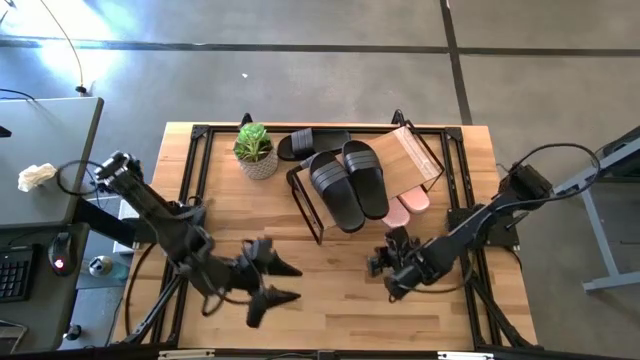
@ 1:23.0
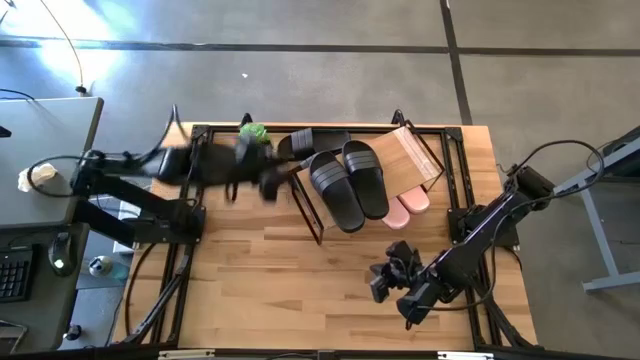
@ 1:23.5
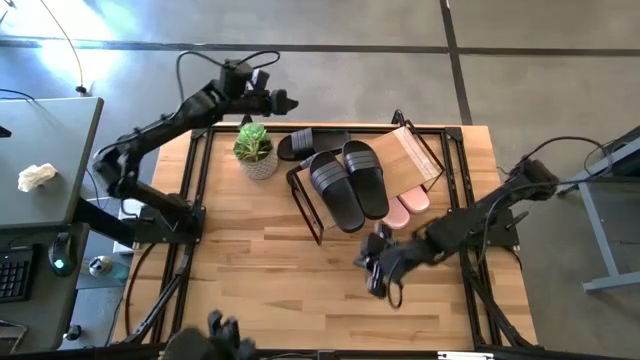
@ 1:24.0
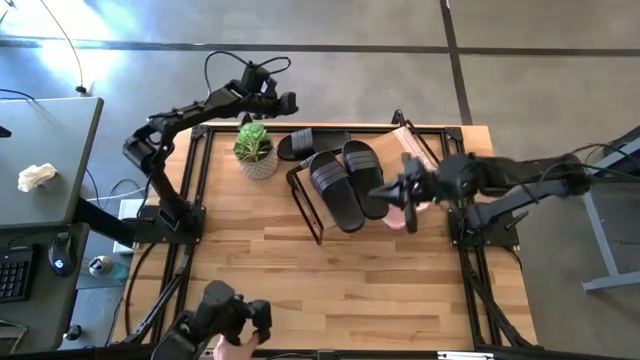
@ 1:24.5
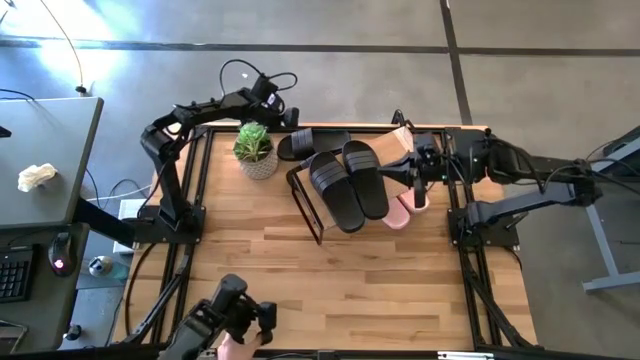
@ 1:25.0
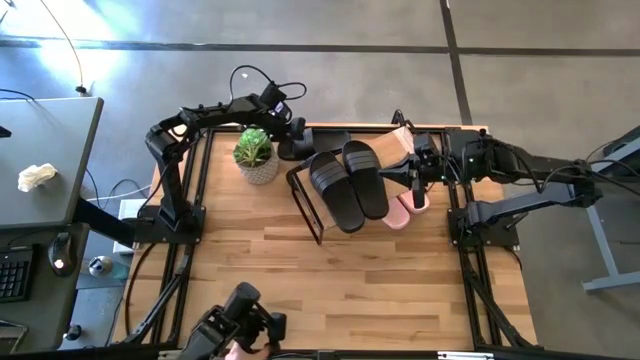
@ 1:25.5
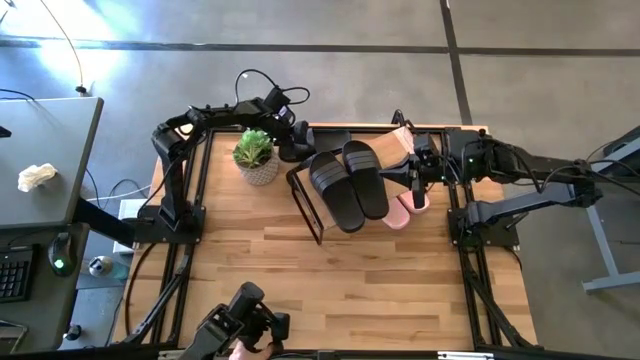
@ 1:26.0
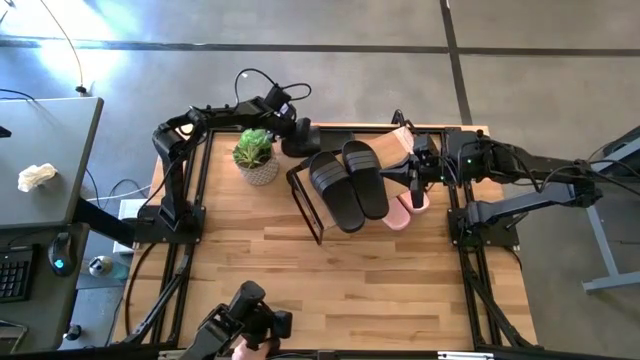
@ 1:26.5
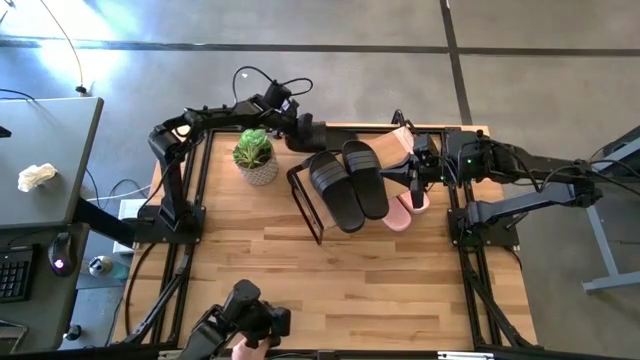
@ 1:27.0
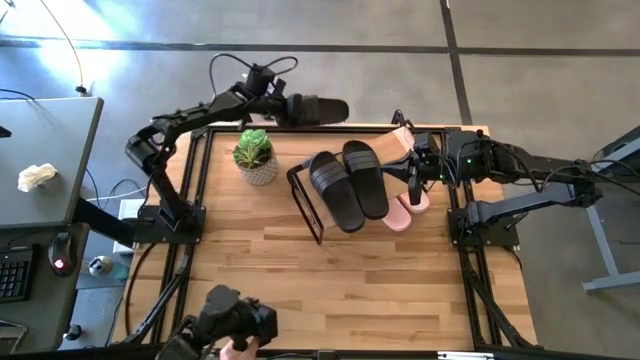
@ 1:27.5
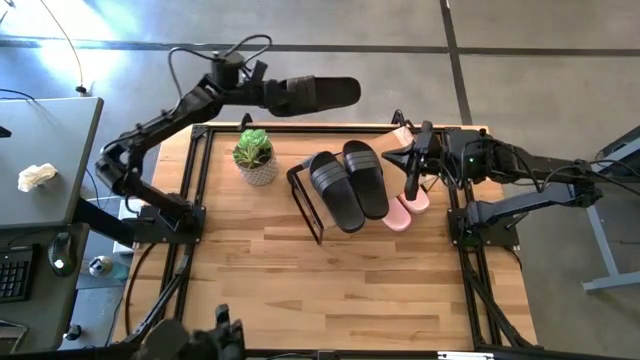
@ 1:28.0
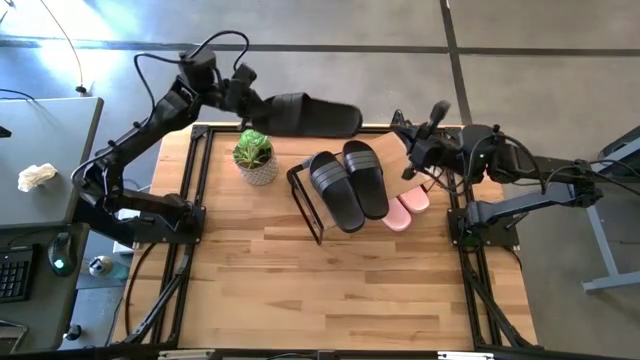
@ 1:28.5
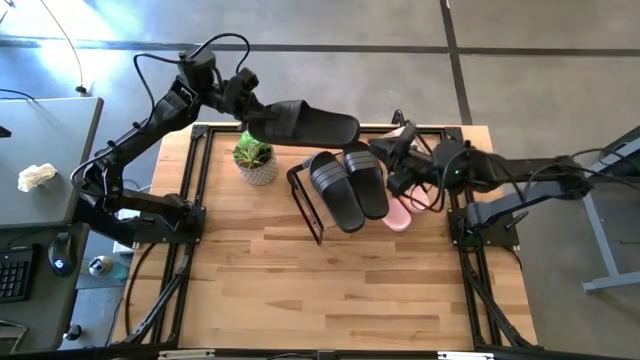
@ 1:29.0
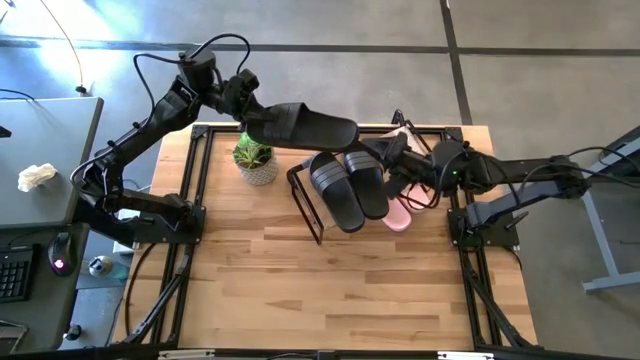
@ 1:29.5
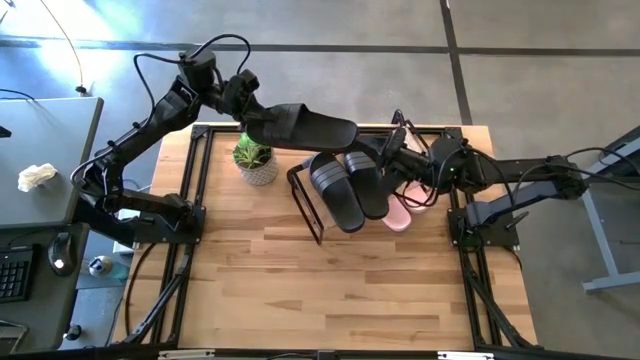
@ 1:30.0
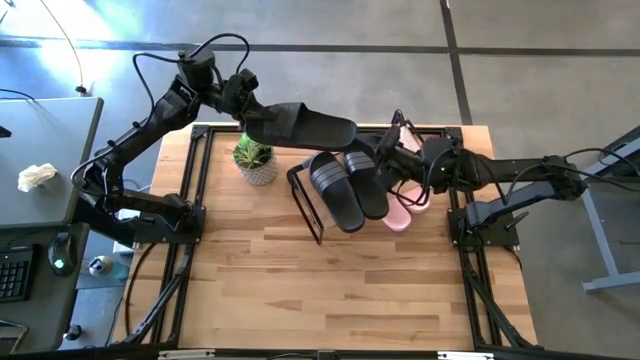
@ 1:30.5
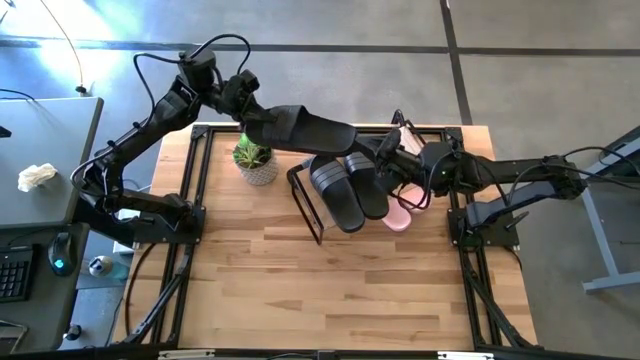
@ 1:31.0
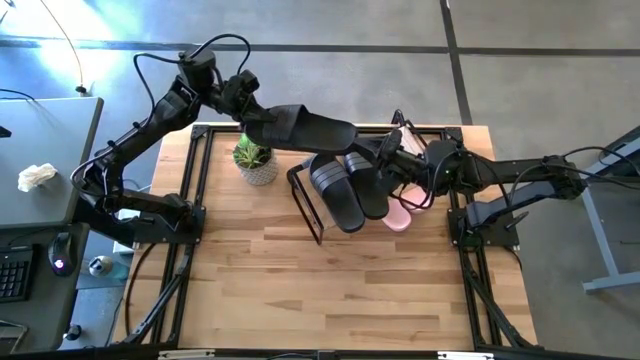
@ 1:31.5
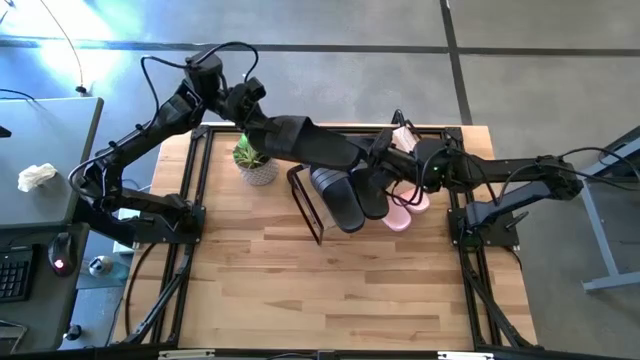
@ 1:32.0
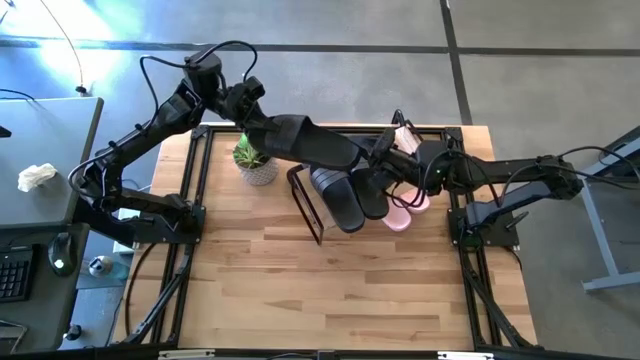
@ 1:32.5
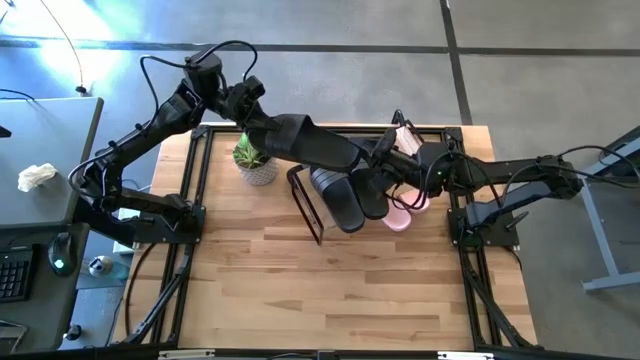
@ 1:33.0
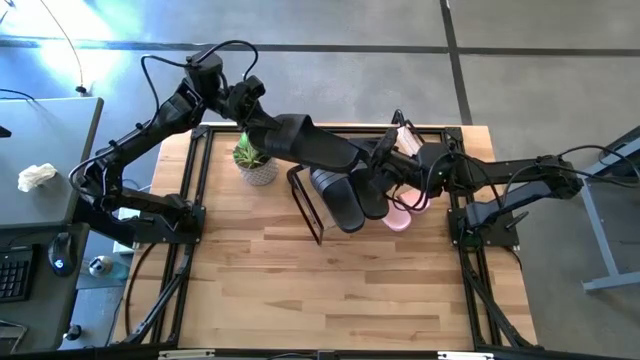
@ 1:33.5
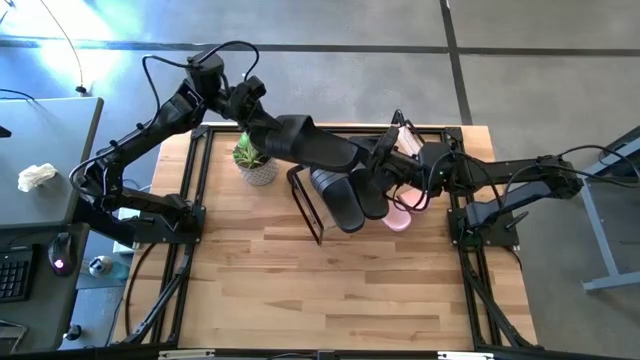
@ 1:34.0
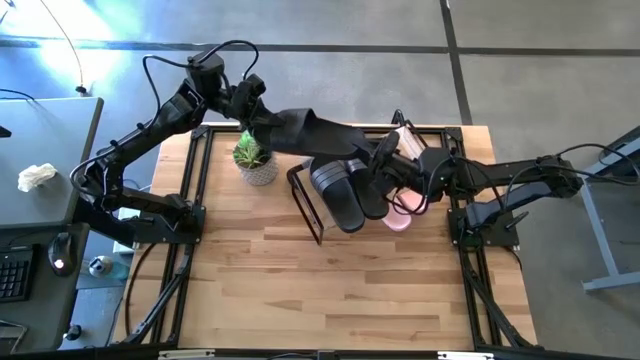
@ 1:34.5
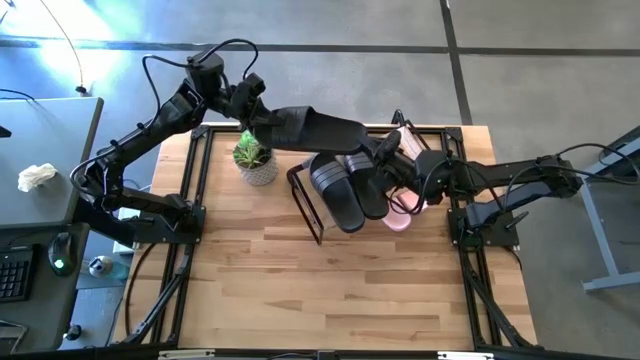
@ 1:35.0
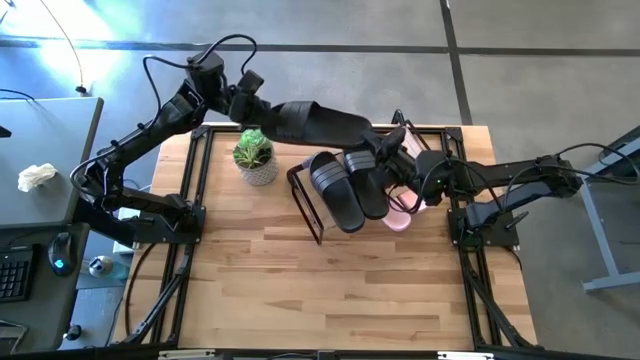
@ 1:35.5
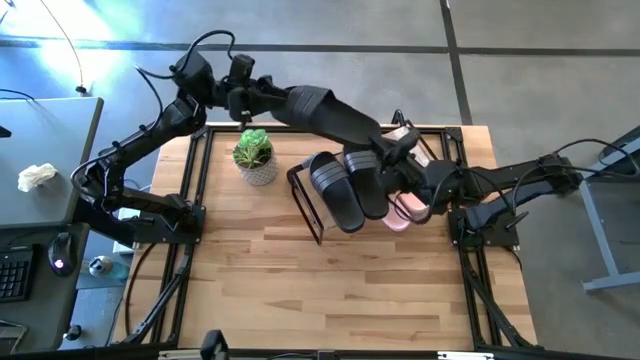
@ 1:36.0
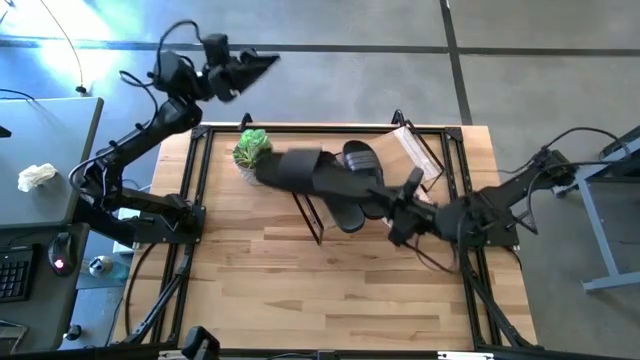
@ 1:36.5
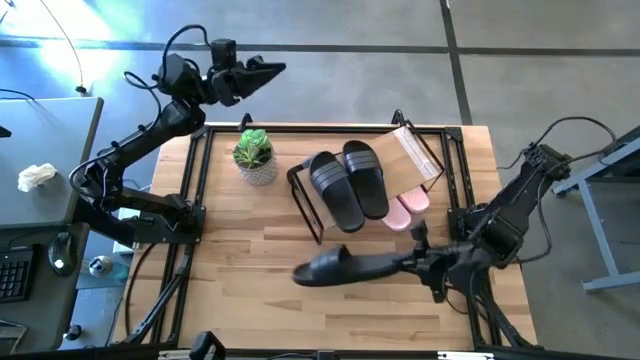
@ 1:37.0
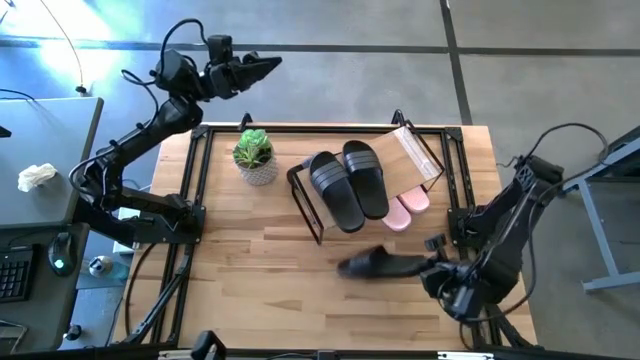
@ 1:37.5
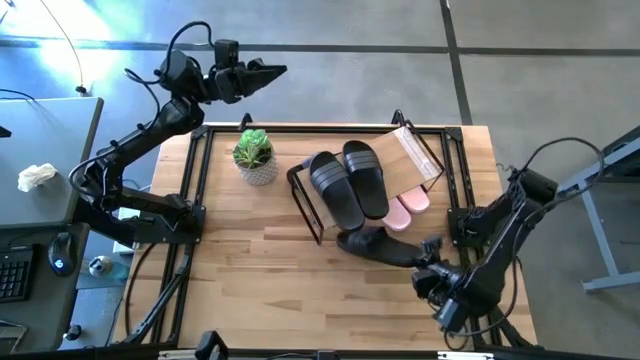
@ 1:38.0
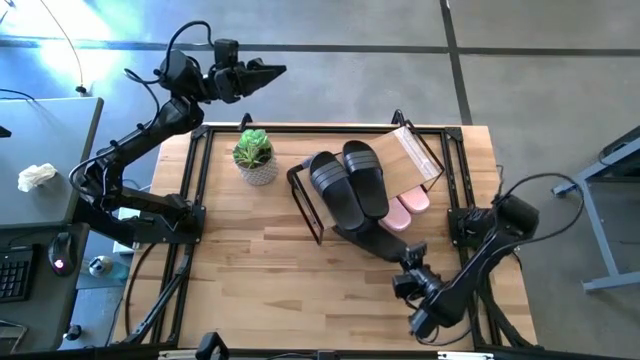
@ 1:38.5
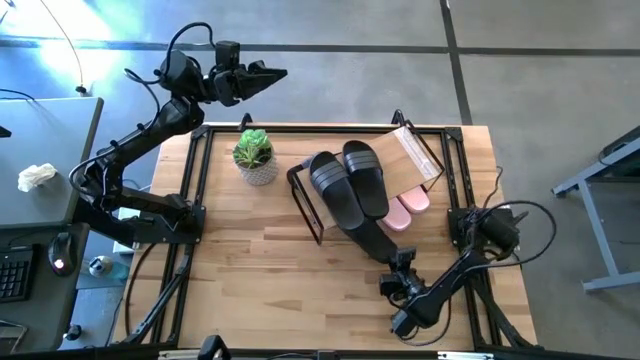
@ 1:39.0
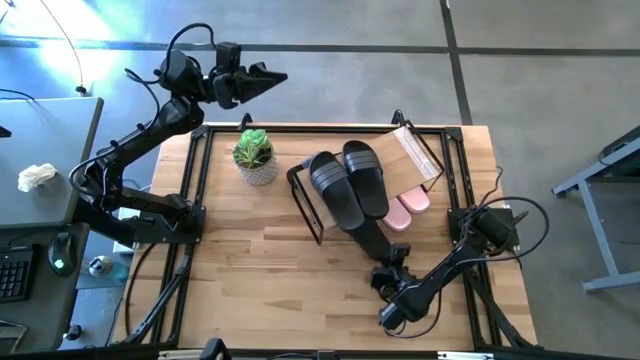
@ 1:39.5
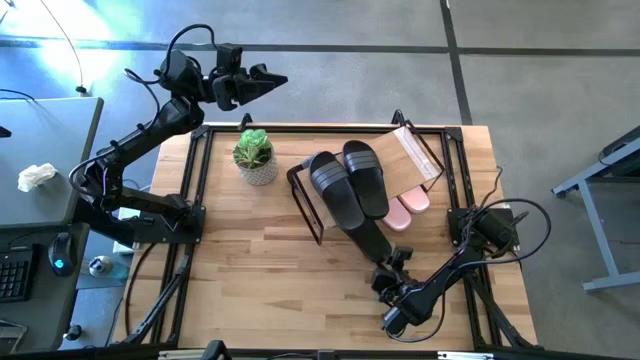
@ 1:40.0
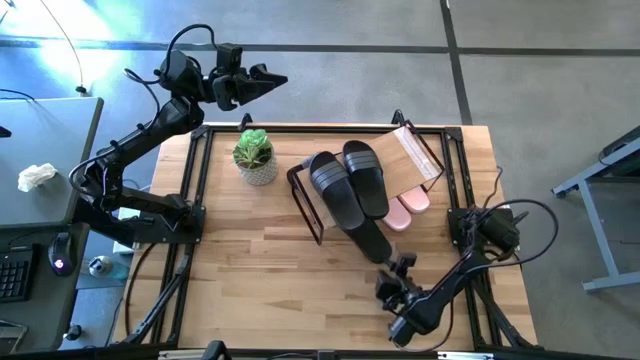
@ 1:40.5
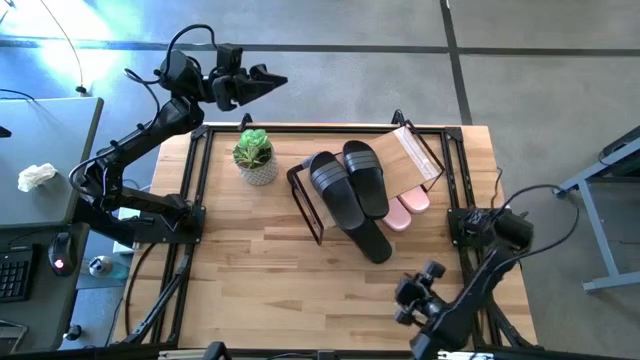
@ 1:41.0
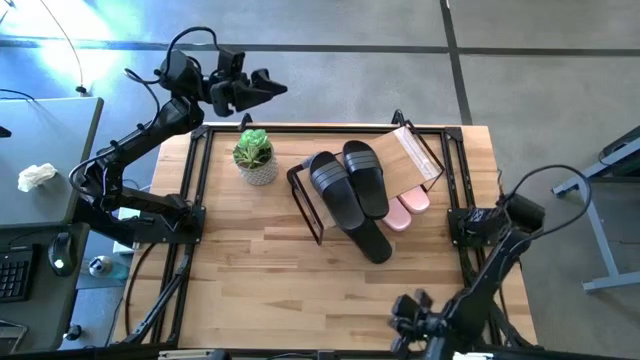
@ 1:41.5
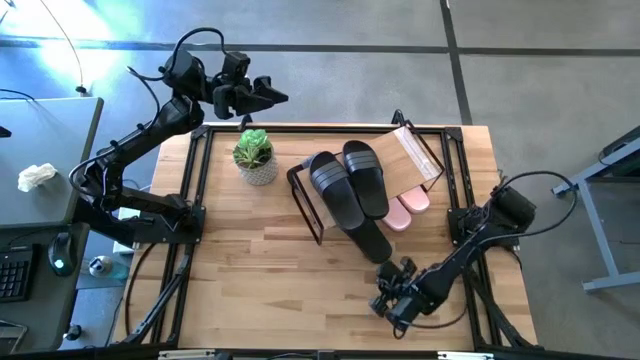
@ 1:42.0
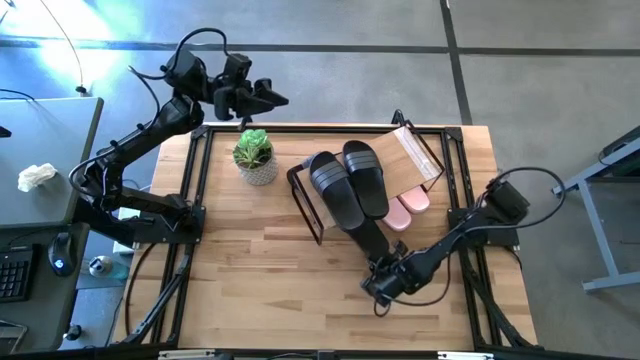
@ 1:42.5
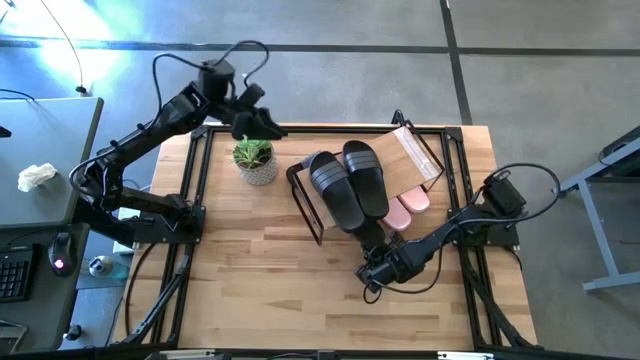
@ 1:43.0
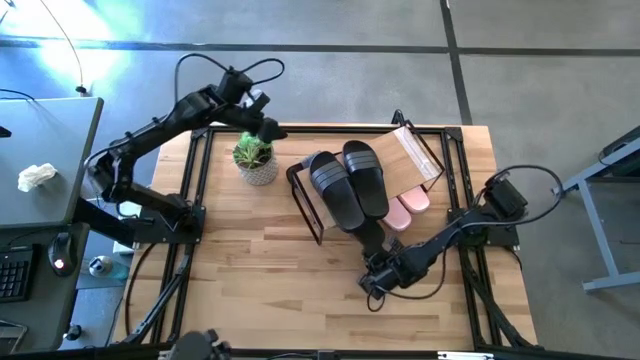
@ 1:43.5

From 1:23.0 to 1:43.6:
Task: Pick and place slides into the shelf
Put the top black slipper under the shelf
